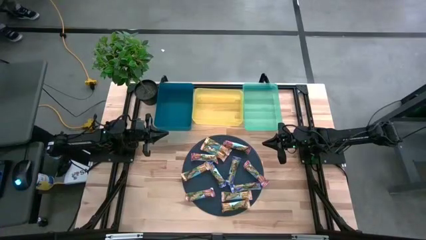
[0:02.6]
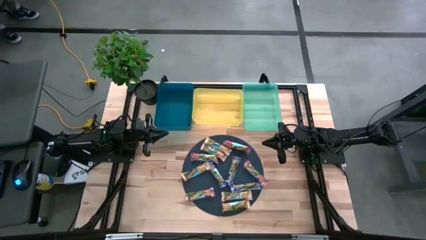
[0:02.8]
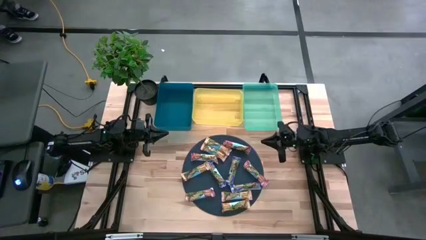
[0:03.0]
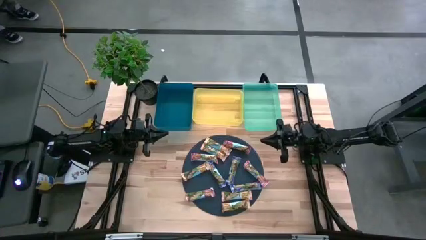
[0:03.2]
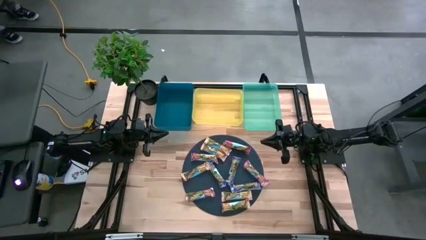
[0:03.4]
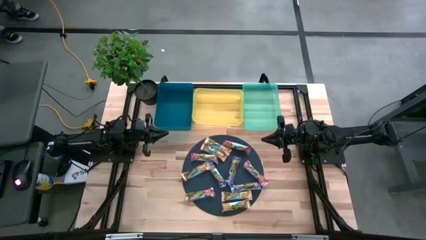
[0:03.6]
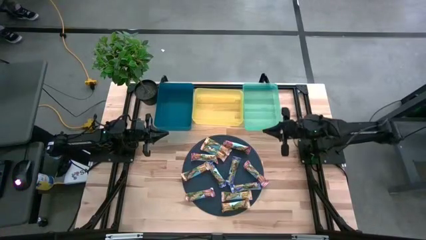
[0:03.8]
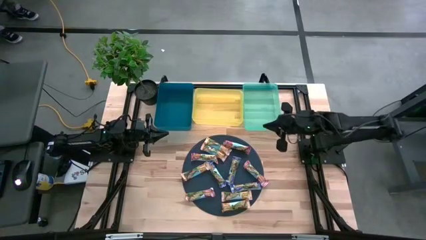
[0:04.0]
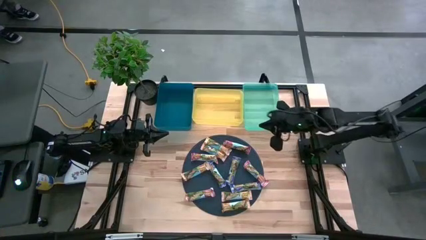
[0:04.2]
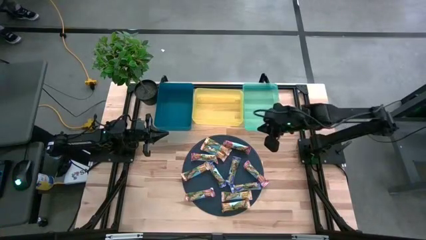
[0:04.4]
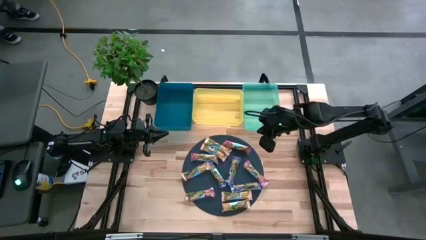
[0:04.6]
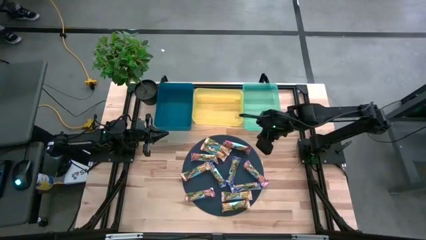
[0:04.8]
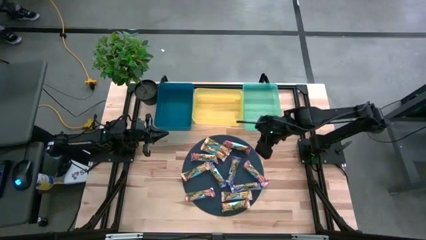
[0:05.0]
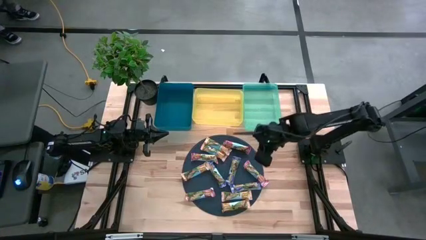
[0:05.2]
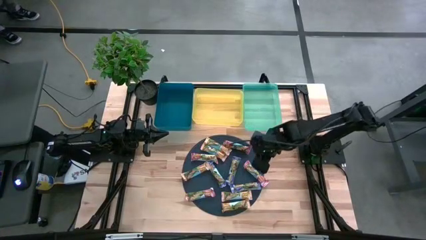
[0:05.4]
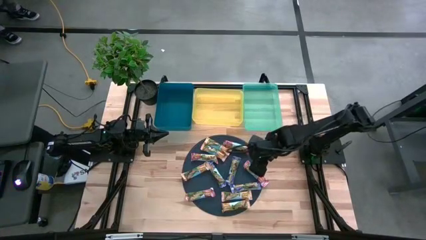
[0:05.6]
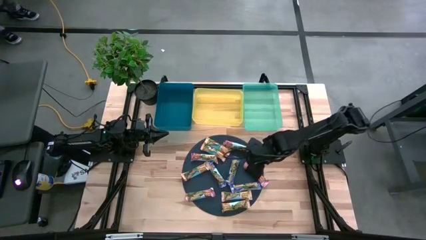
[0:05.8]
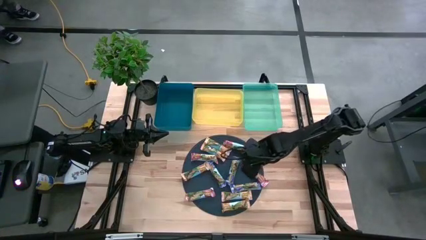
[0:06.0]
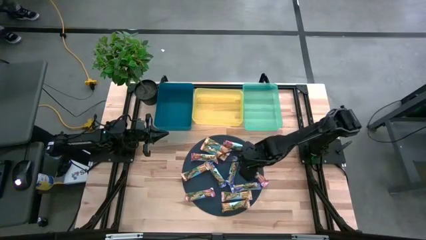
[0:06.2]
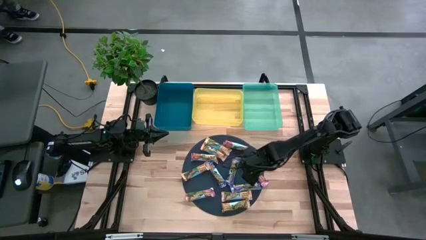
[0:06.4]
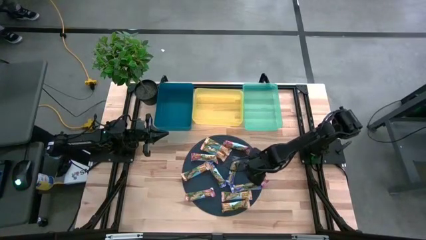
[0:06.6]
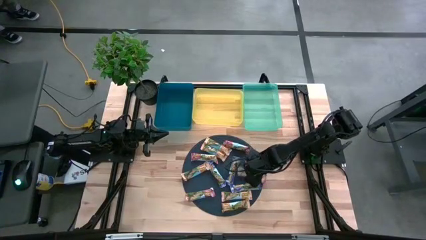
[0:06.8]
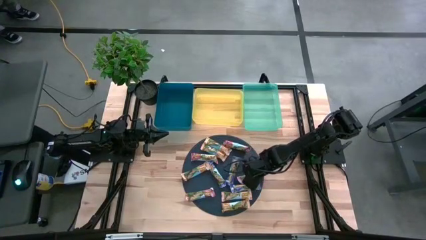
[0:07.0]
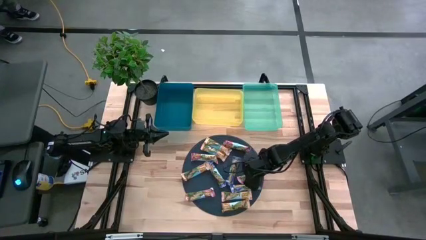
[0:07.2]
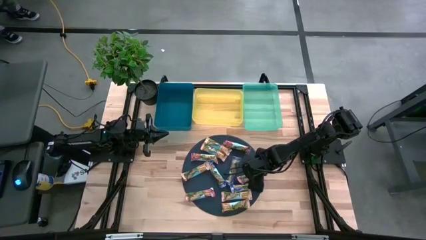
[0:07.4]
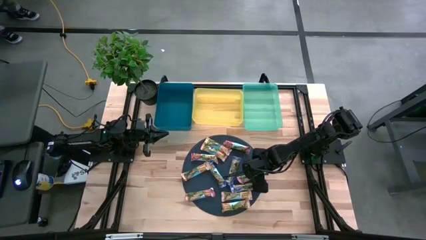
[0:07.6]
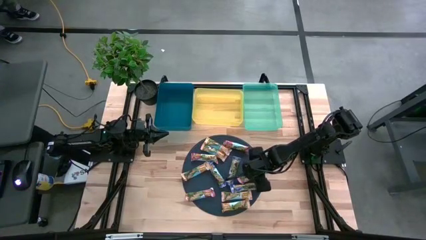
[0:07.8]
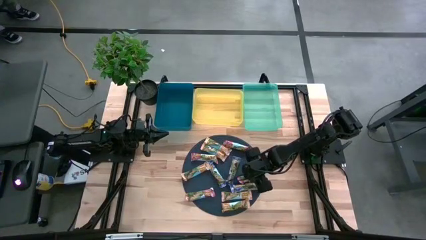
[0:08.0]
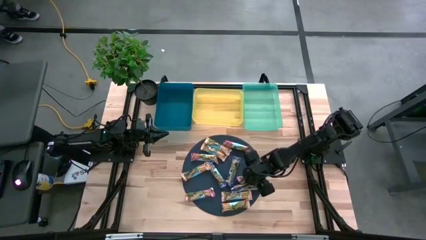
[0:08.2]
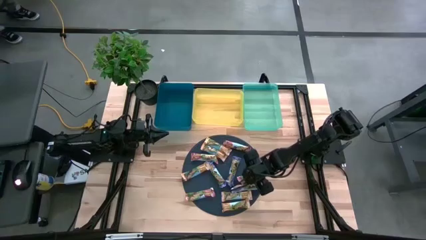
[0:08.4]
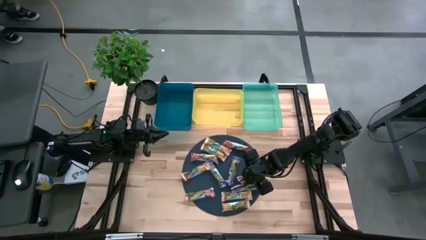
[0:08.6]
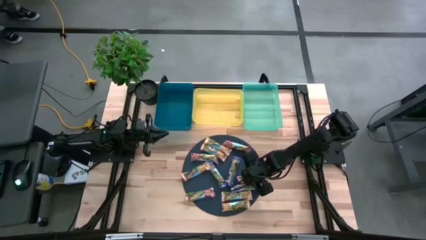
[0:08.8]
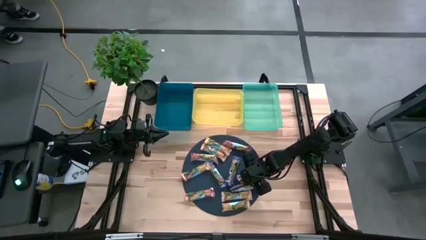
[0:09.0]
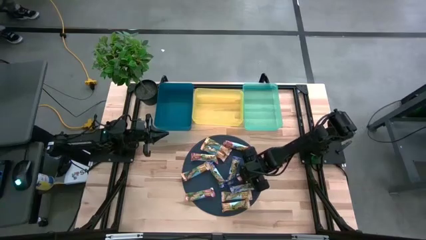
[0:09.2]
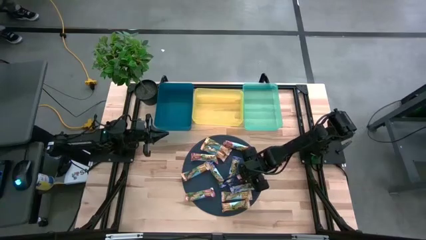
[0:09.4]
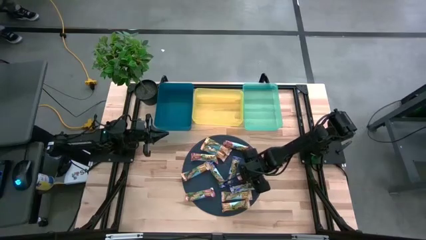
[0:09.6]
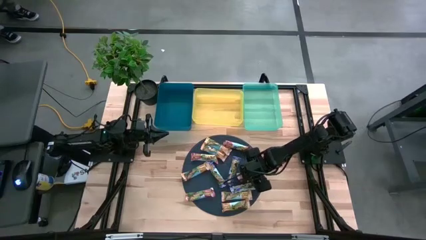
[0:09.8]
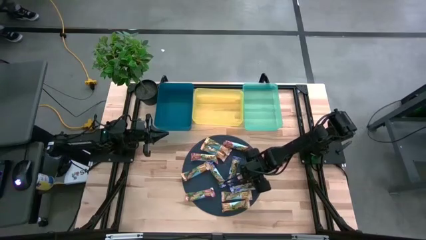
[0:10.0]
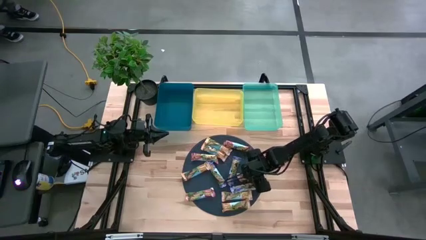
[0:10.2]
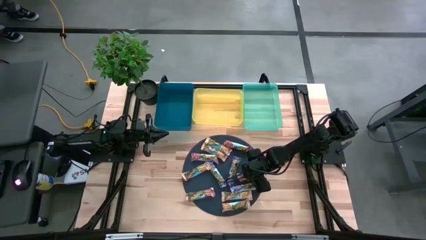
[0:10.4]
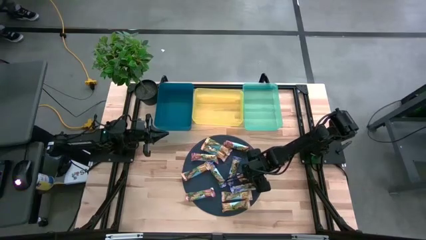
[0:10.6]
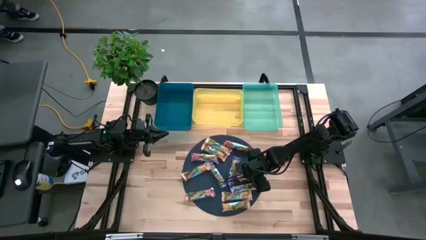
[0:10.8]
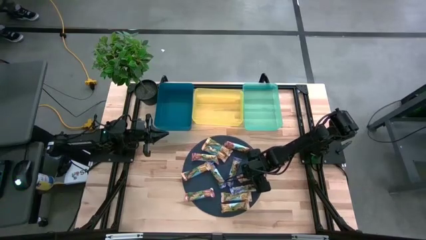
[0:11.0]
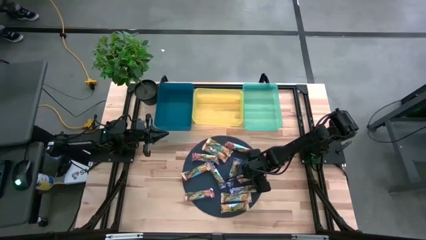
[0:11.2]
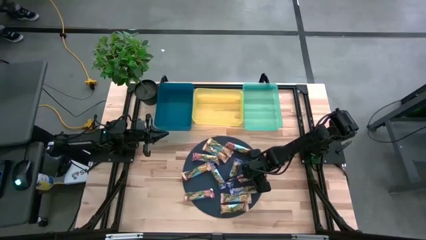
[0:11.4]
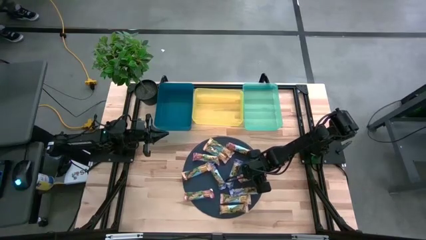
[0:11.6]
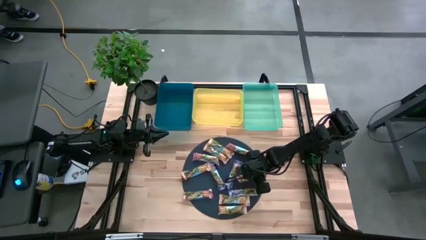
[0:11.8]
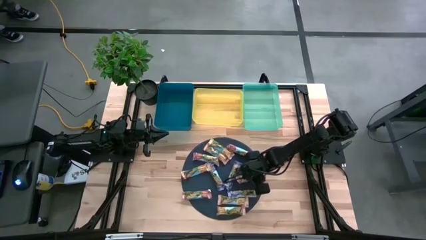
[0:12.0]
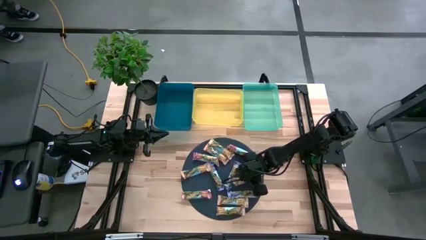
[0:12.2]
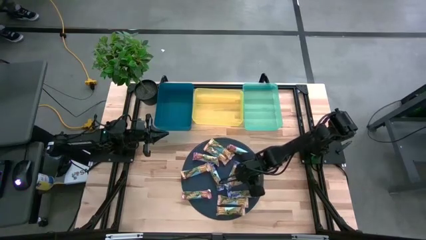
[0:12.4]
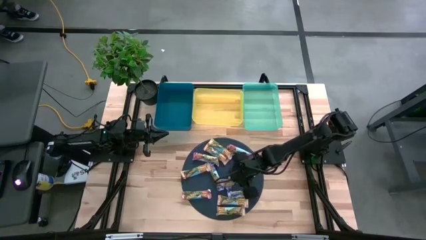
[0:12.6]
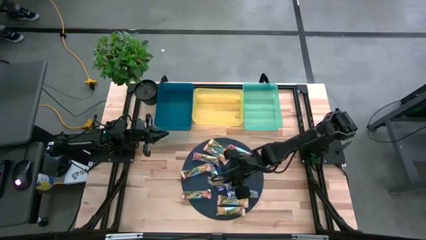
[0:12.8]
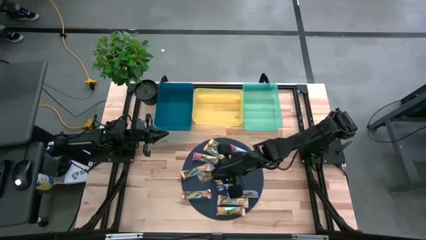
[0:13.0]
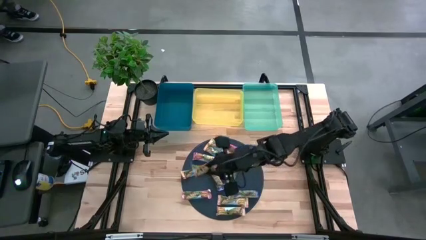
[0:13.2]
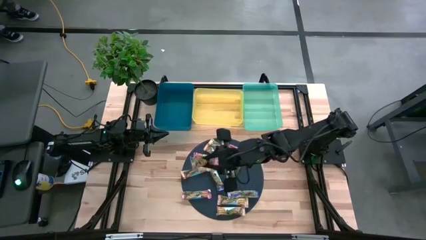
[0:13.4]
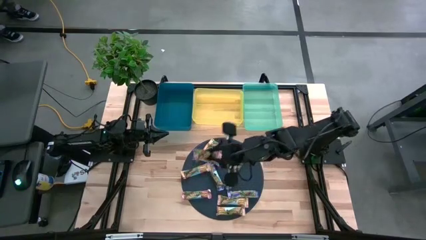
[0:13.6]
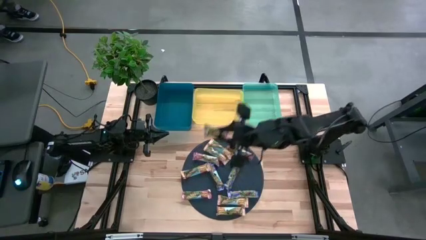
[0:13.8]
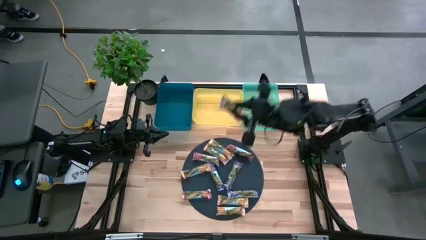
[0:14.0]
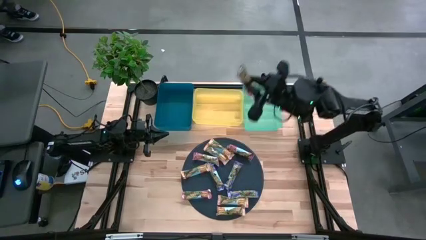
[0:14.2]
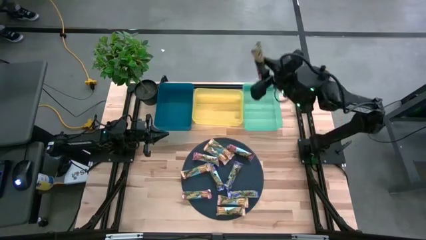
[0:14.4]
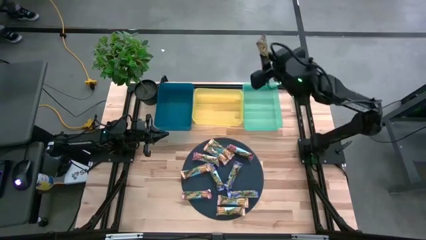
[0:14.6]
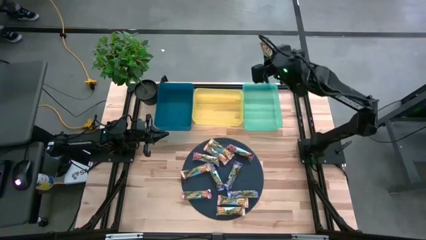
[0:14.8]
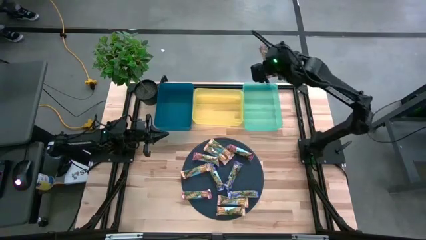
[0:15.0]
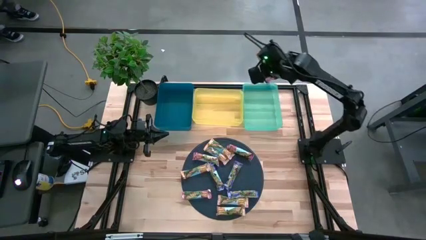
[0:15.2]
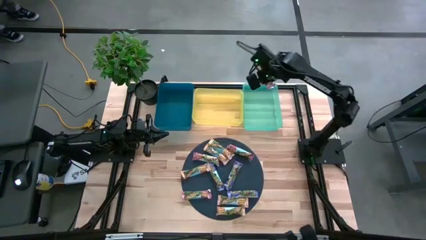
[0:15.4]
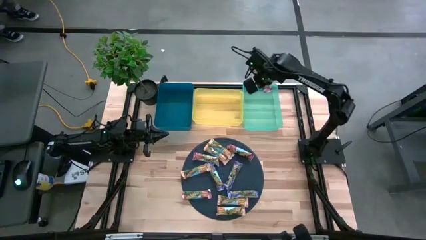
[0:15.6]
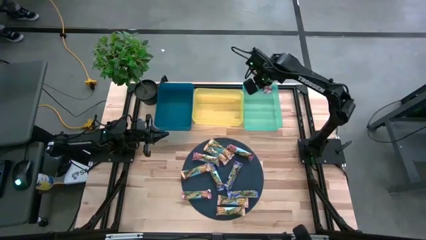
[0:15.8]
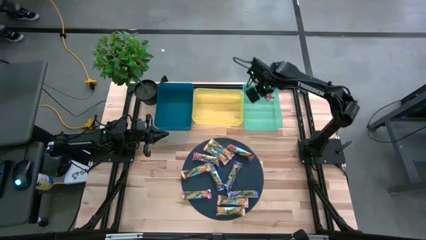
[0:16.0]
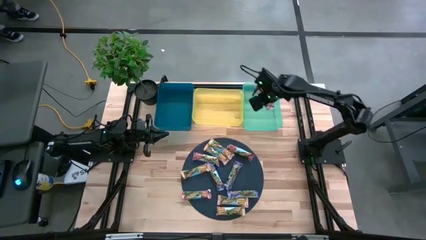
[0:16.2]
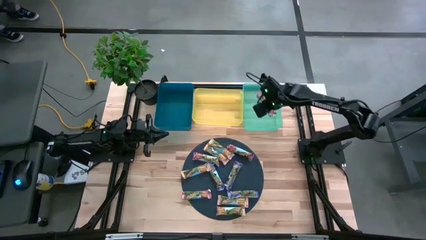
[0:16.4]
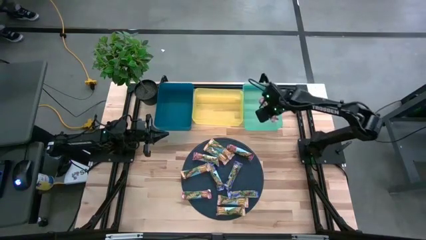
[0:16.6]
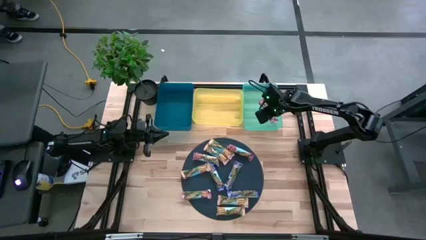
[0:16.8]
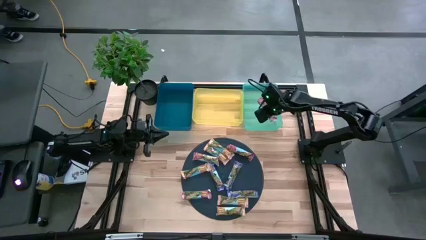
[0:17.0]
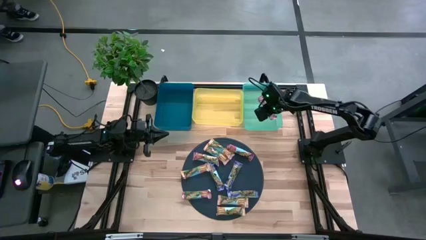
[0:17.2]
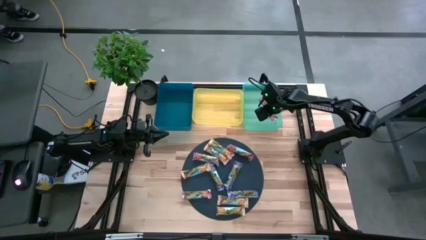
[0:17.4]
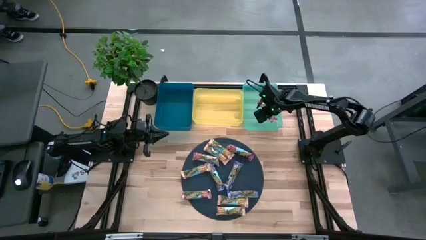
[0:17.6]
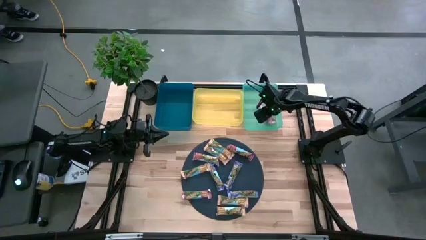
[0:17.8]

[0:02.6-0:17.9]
Task: Pick and place Granola Bars by type
Put the red granola bar into the green bin
